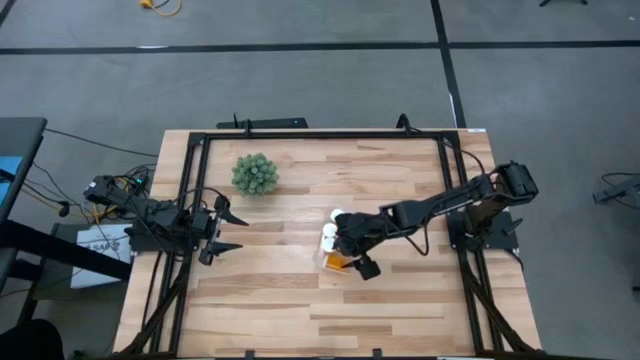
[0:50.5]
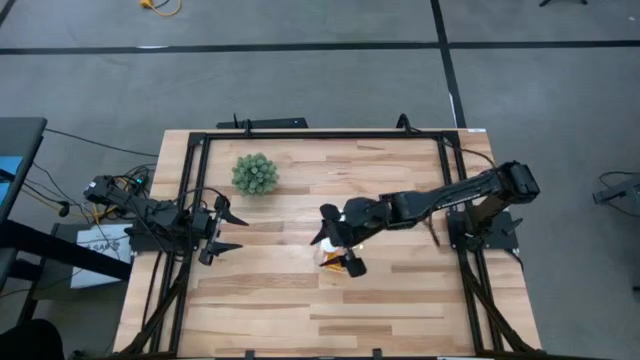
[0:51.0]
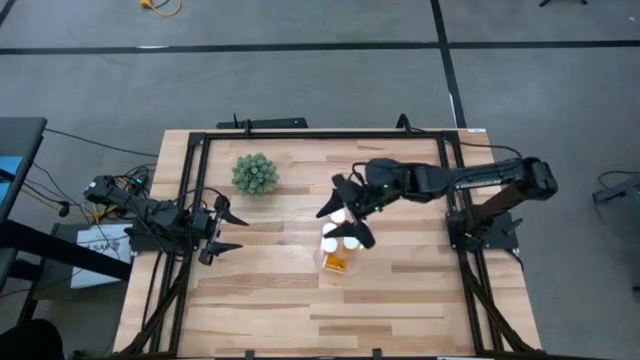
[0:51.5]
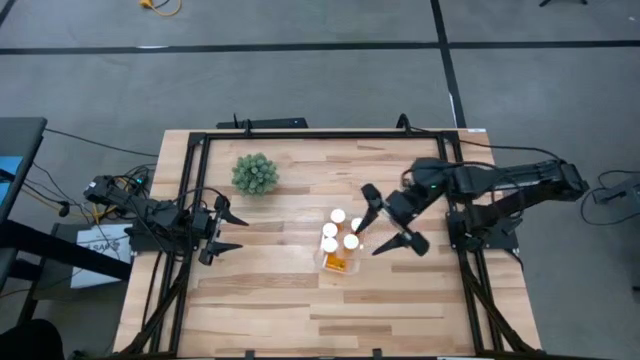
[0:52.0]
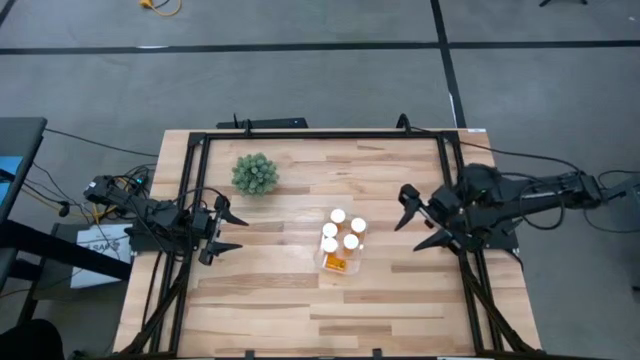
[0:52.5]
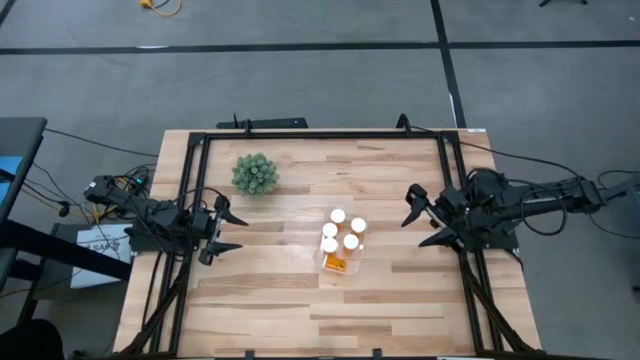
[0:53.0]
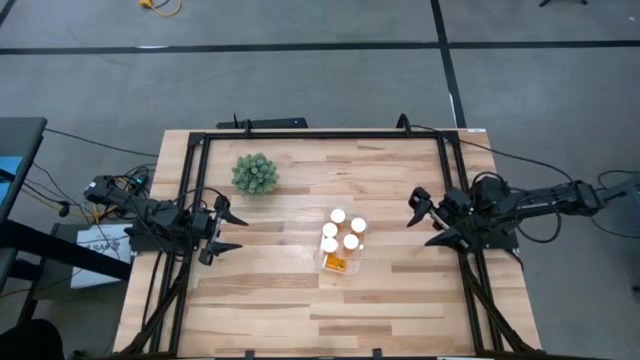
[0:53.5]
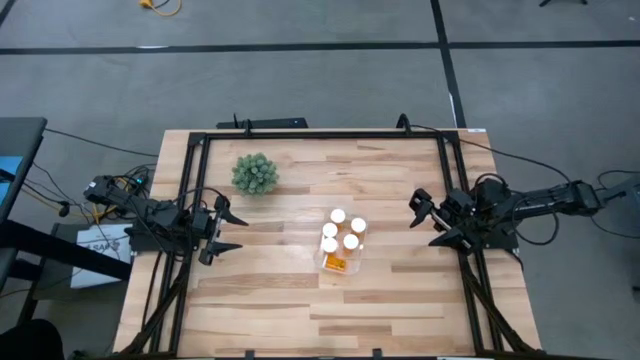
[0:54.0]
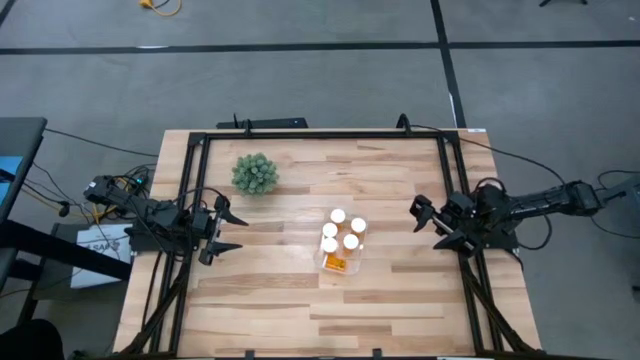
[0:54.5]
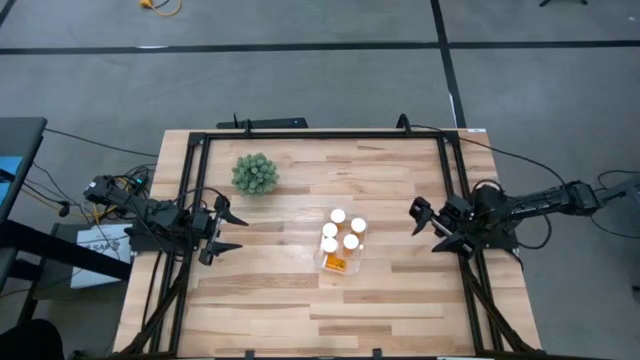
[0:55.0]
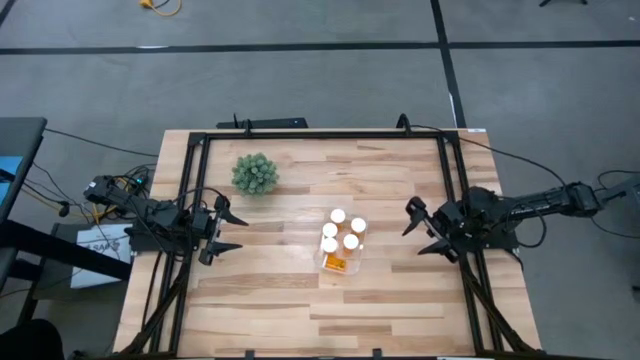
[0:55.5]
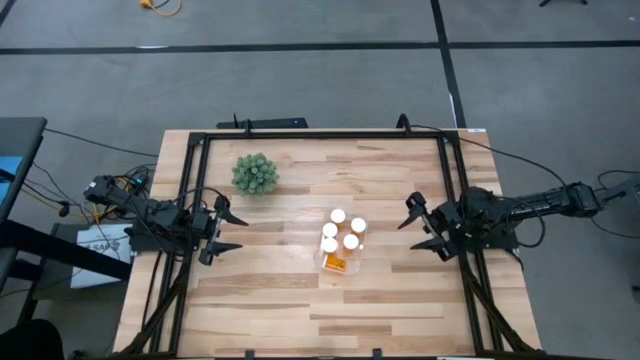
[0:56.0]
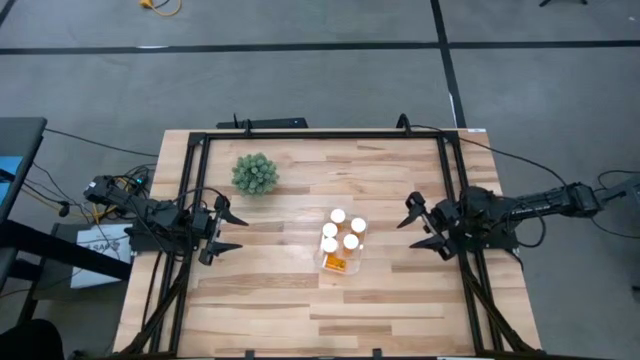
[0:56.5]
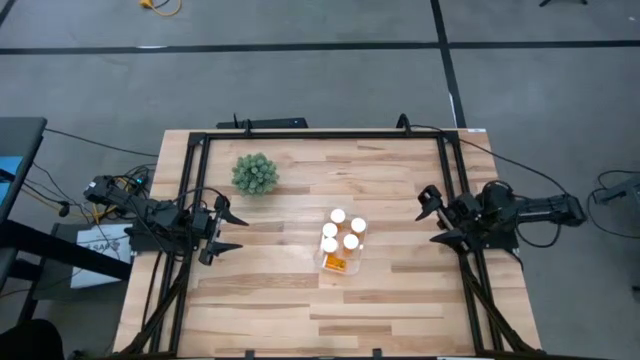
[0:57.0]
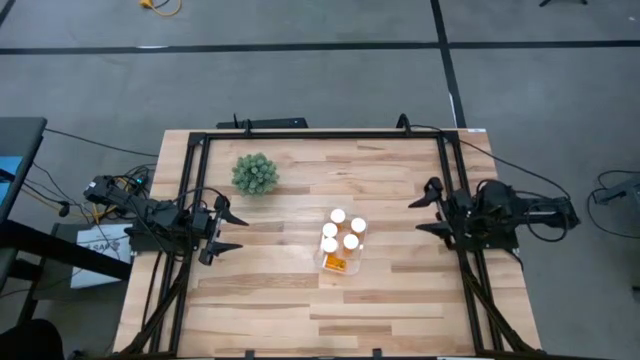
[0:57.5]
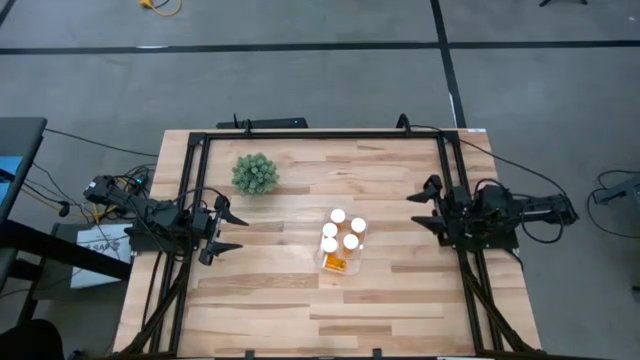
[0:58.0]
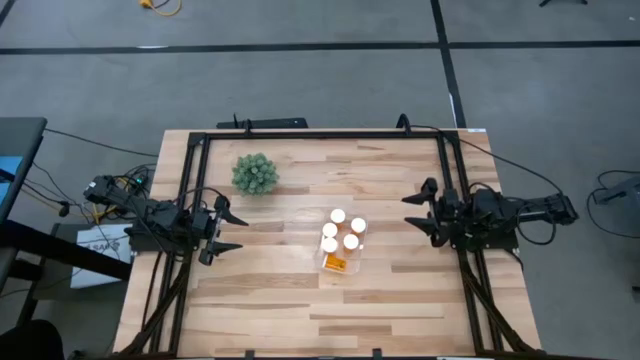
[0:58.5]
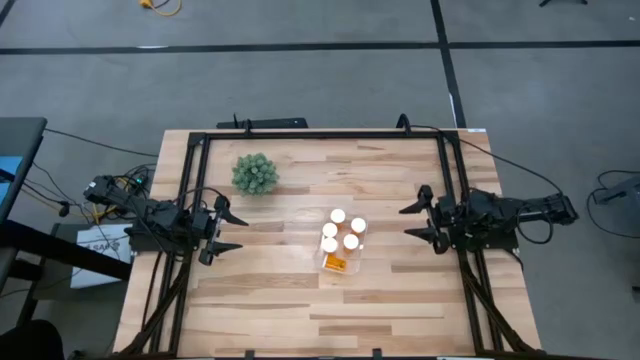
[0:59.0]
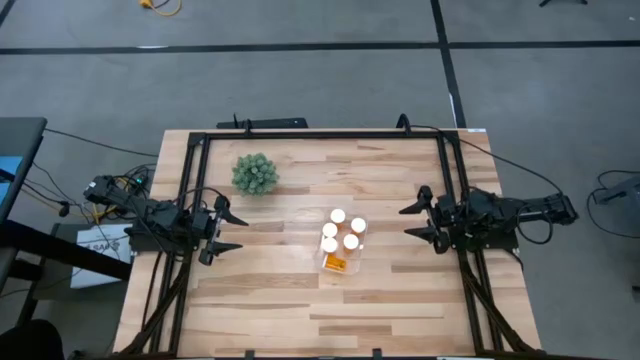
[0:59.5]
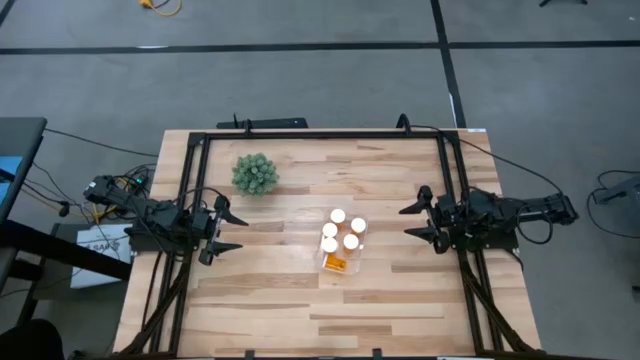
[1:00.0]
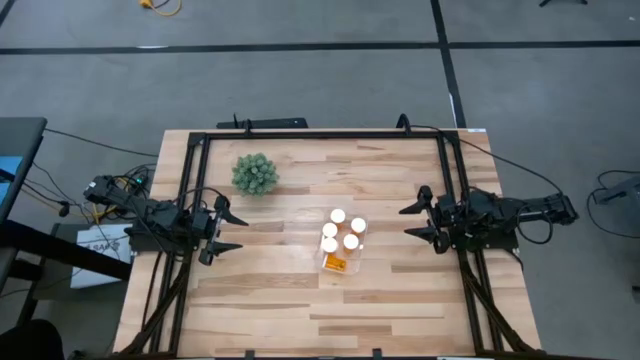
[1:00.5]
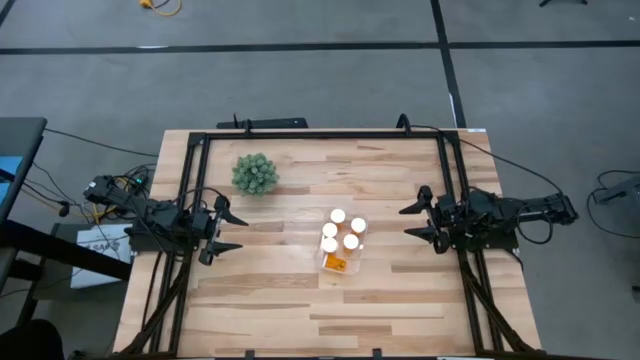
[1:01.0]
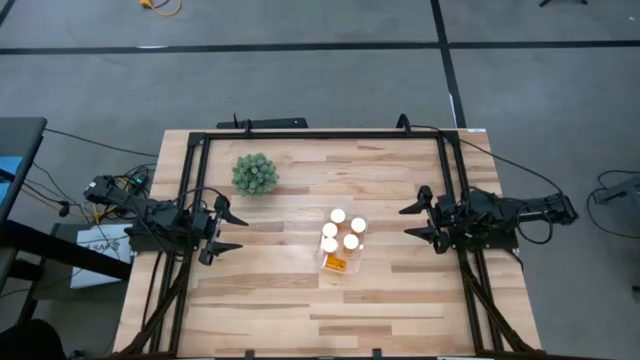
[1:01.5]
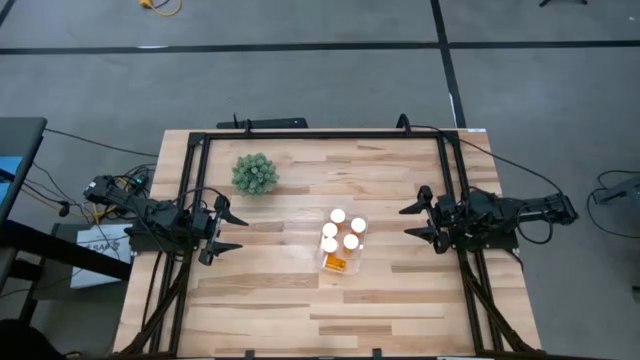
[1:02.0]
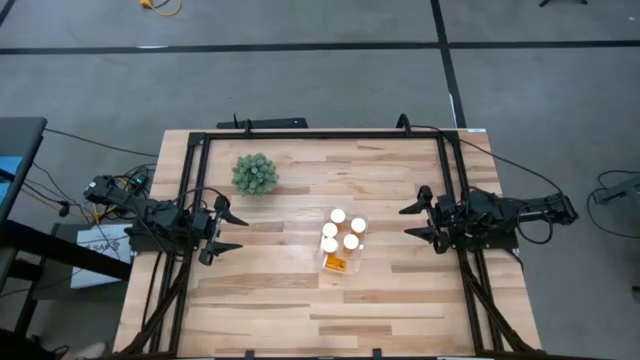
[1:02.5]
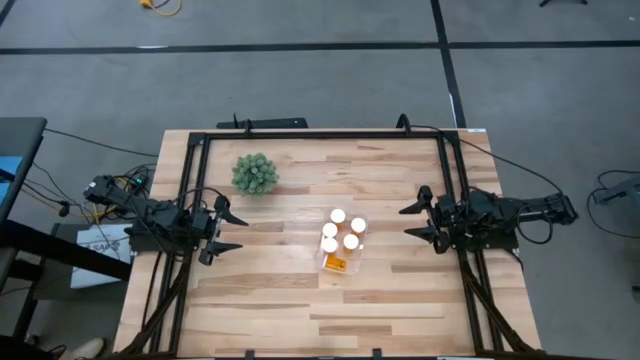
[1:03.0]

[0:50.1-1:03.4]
Task: Pick and place pill bottles into a basket
Return to Home Position

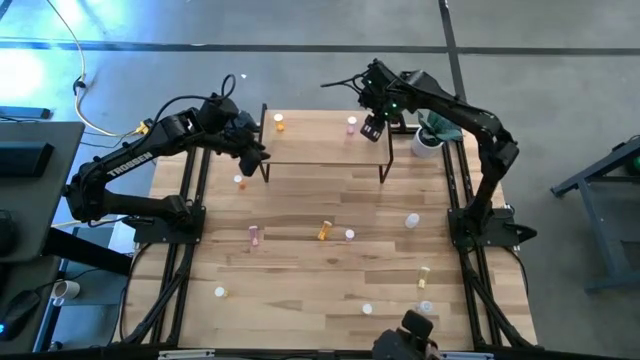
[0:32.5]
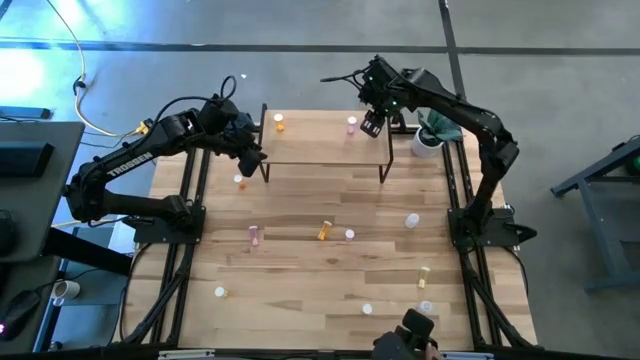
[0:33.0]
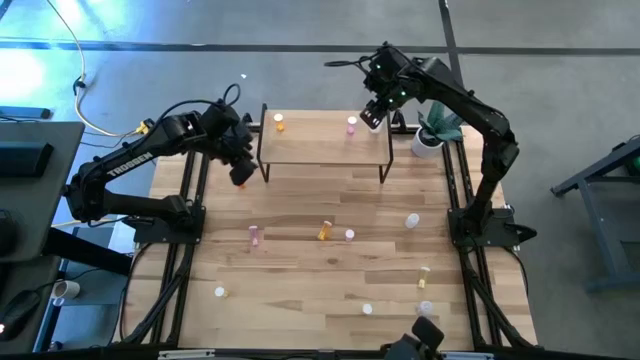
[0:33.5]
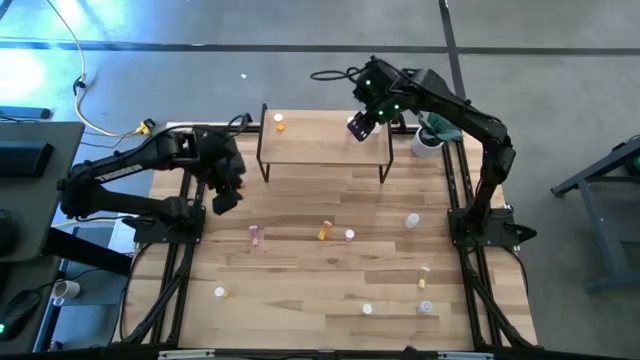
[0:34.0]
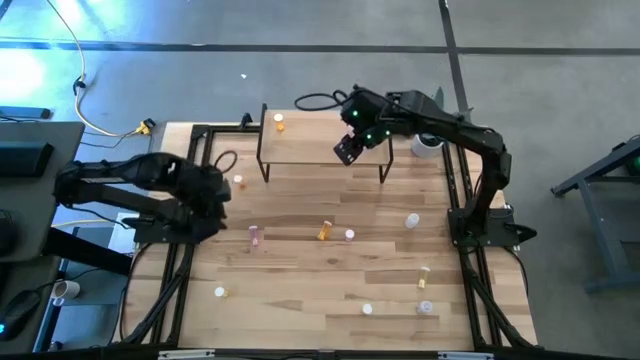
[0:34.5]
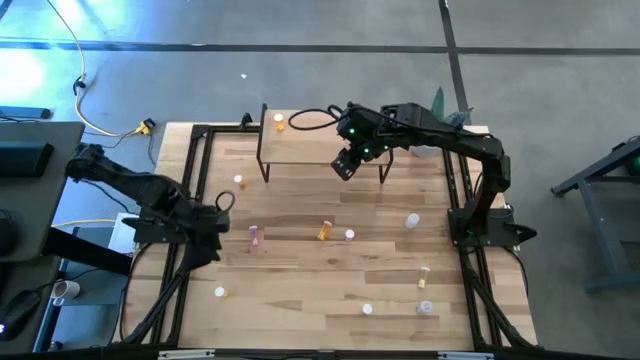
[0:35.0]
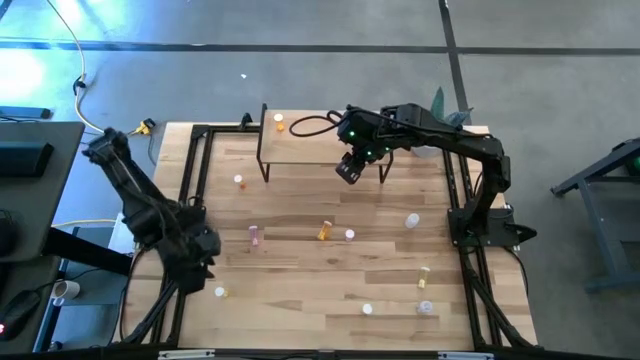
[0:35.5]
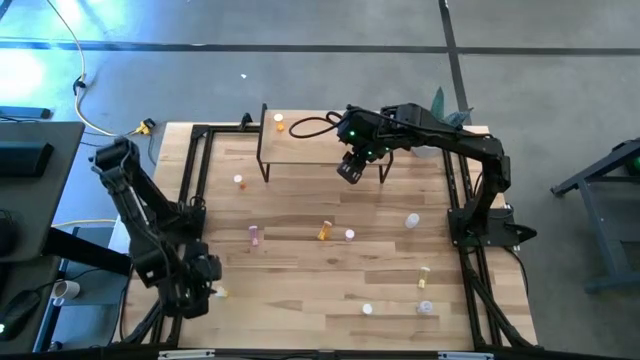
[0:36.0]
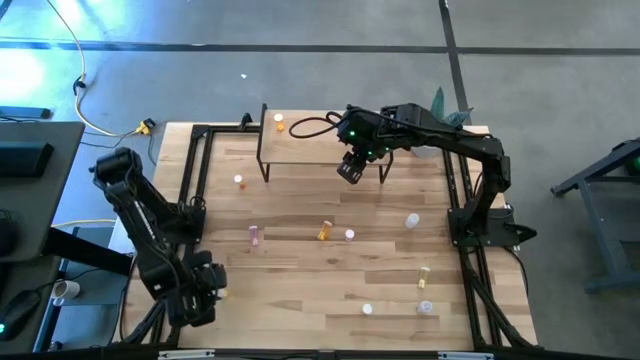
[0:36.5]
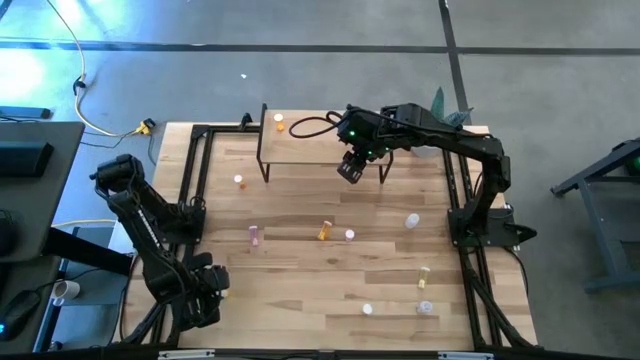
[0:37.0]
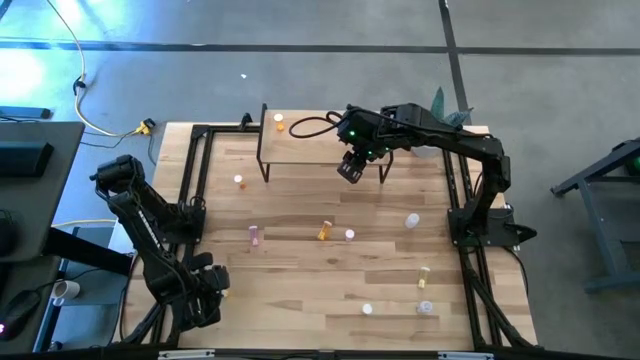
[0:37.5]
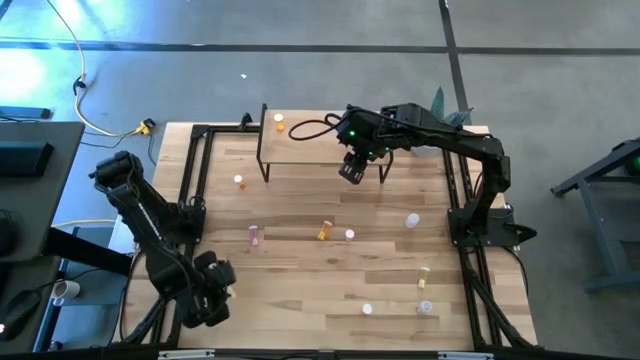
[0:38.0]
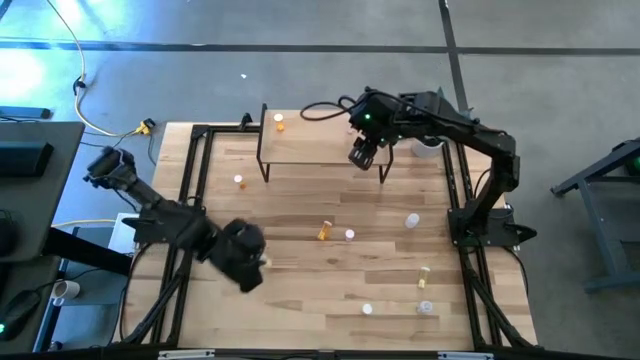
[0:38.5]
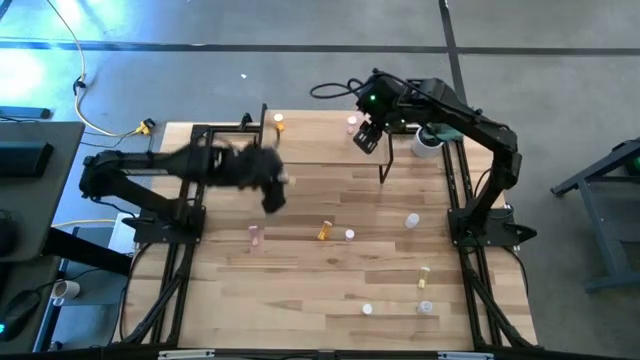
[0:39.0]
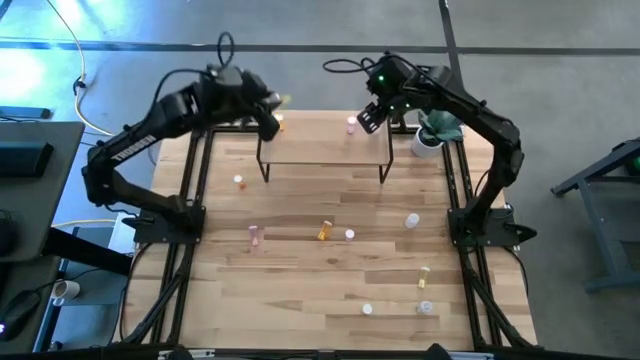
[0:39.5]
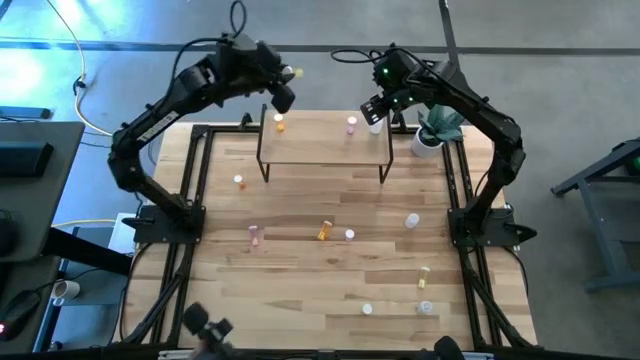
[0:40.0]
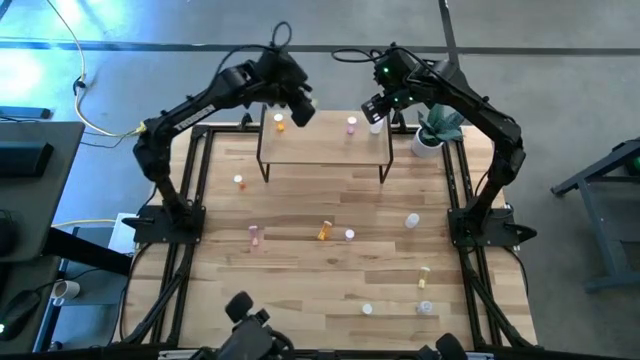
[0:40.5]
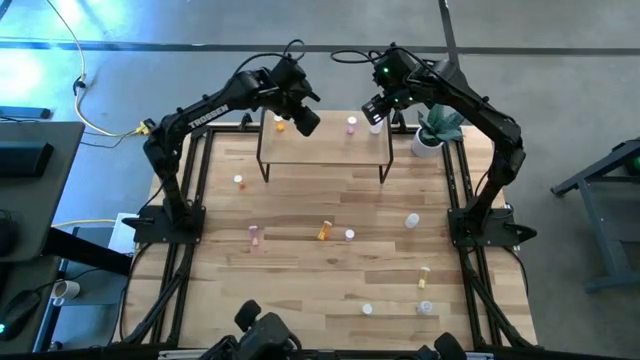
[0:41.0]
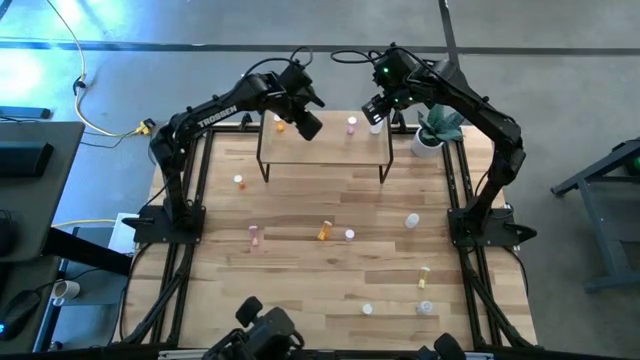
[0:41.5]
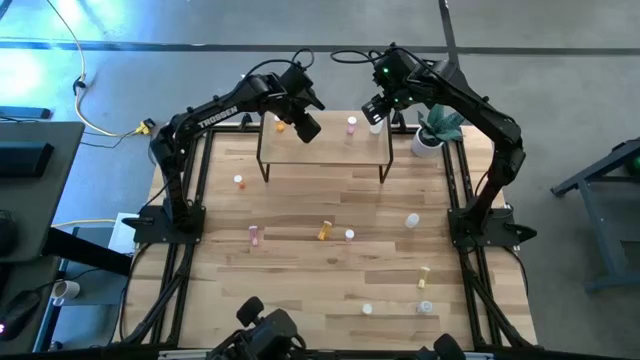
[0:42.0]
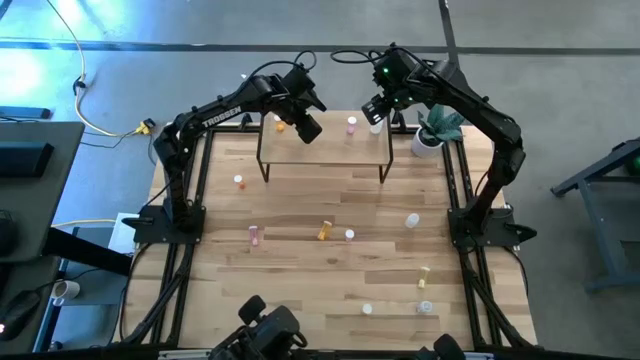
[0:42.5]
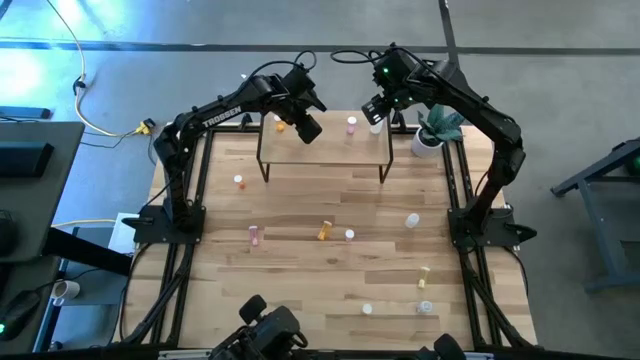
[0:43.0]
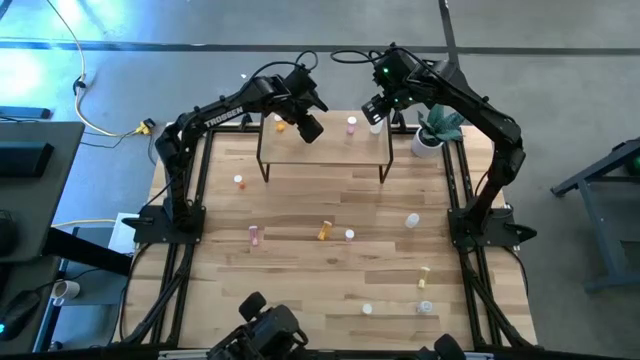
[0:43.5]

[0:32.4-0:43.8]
Task: Pick and place medicine bottles onto shelf by color
Put the left yellow pill bottle on the shelf
